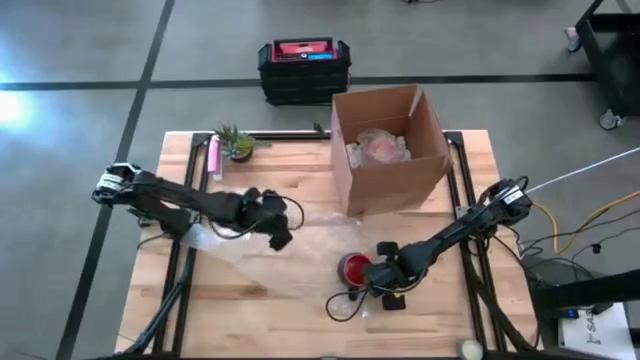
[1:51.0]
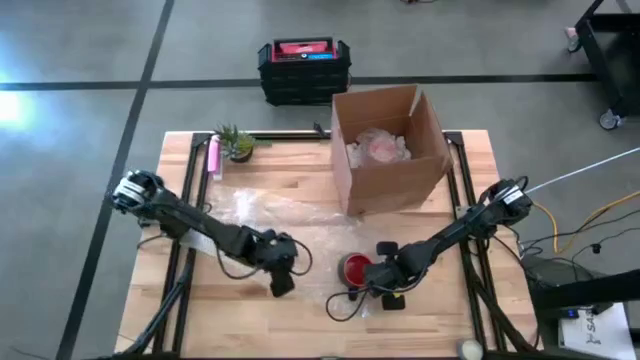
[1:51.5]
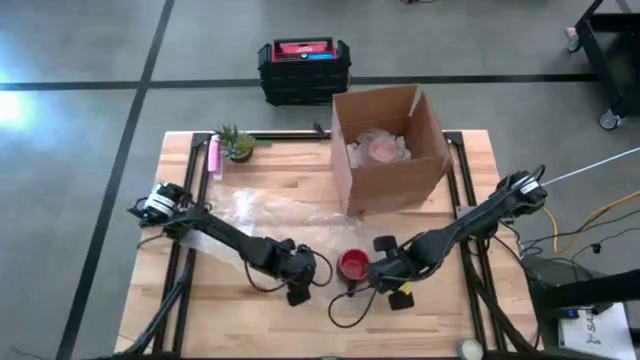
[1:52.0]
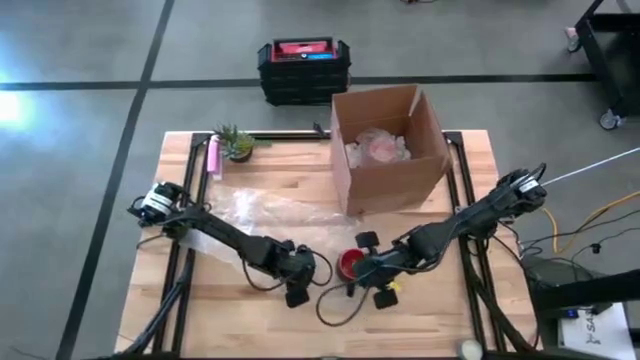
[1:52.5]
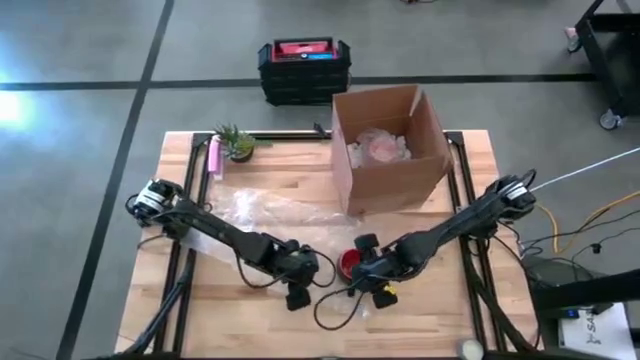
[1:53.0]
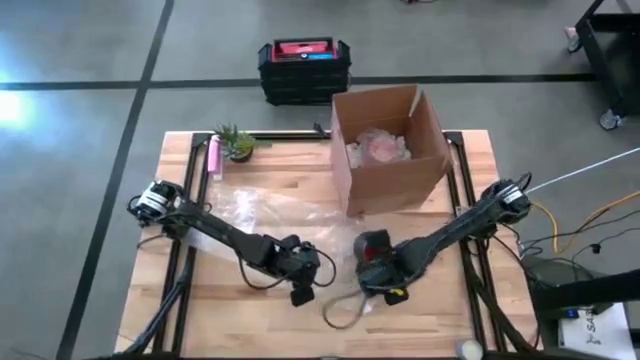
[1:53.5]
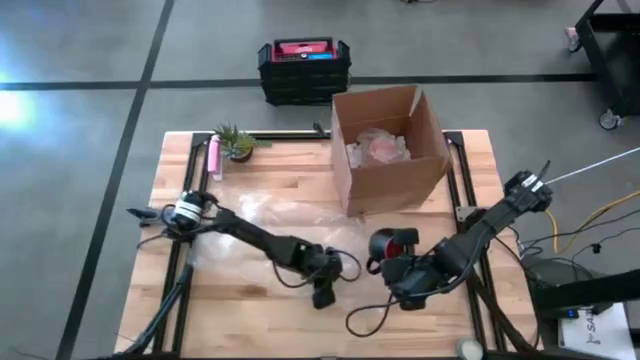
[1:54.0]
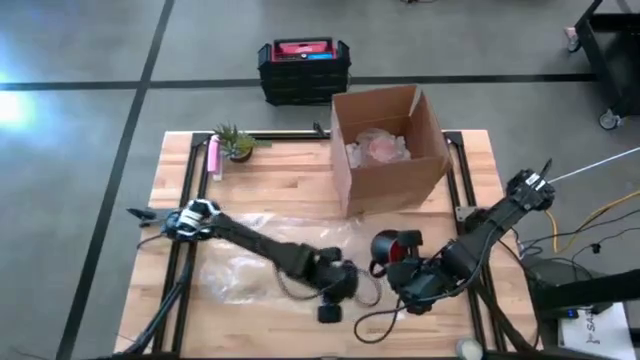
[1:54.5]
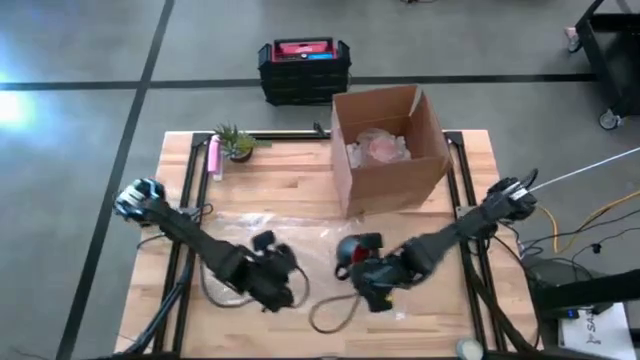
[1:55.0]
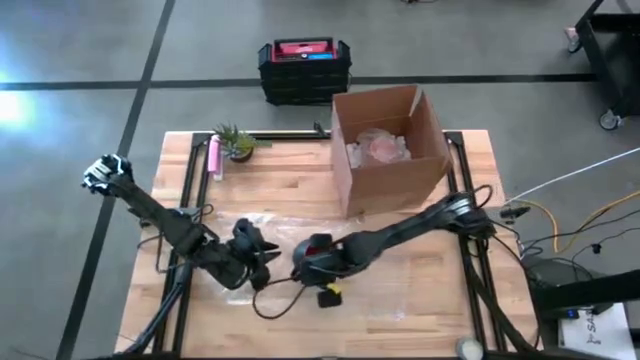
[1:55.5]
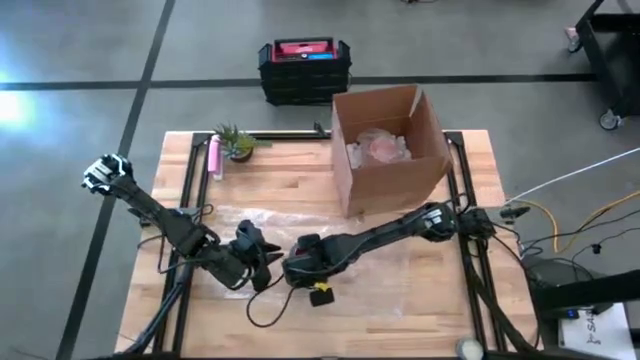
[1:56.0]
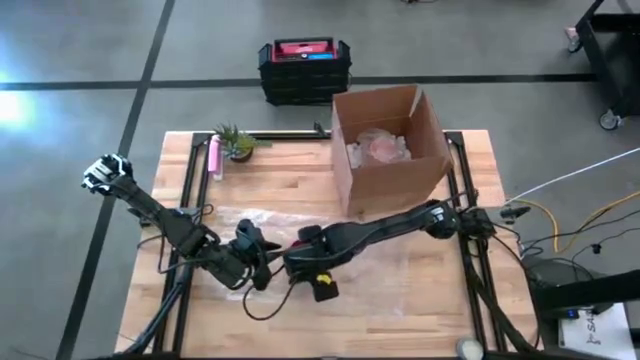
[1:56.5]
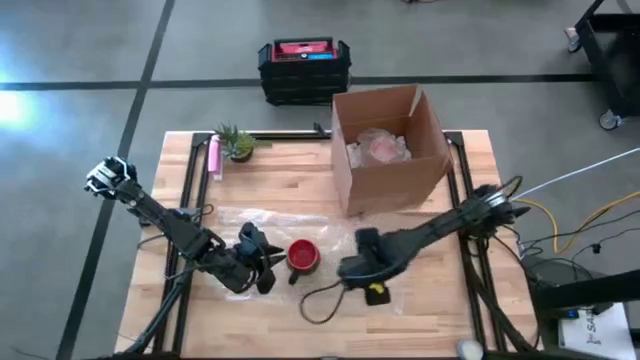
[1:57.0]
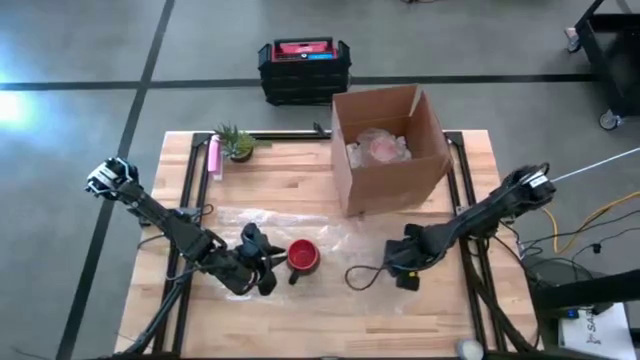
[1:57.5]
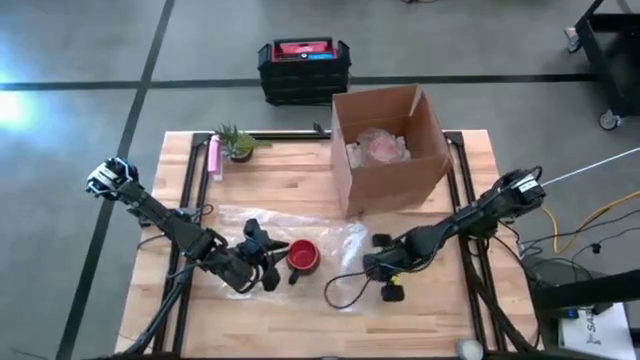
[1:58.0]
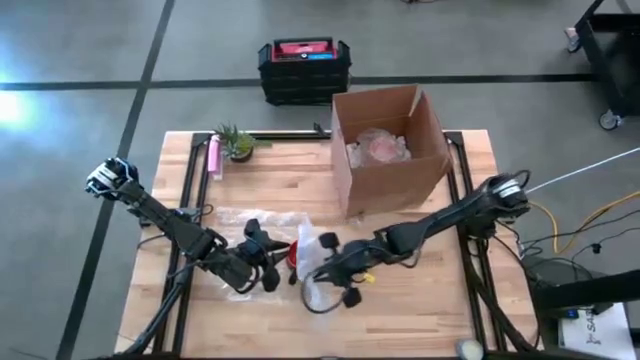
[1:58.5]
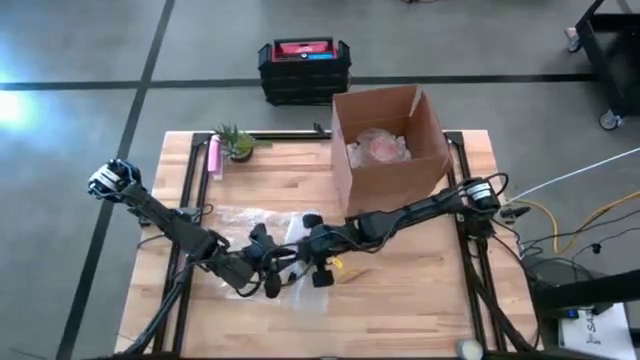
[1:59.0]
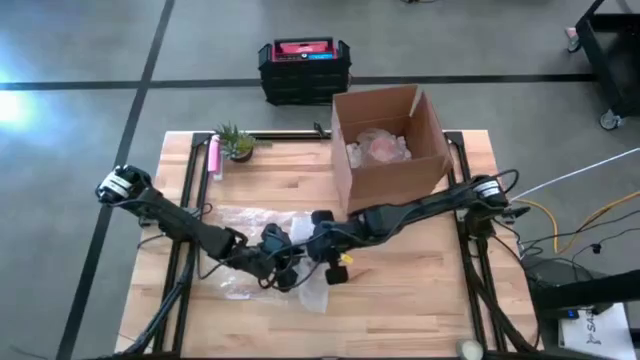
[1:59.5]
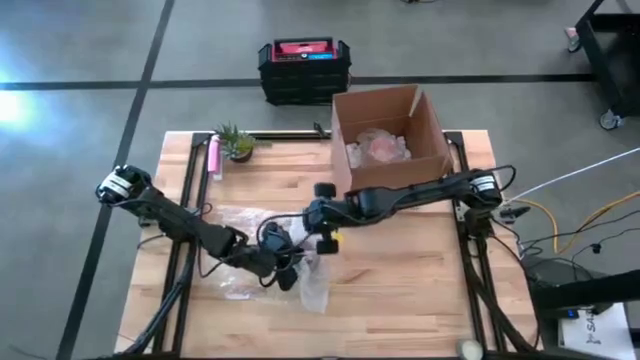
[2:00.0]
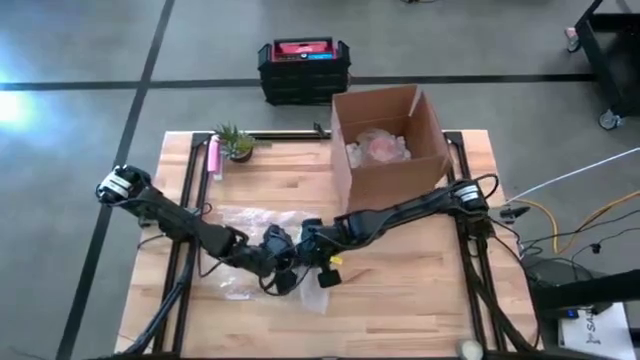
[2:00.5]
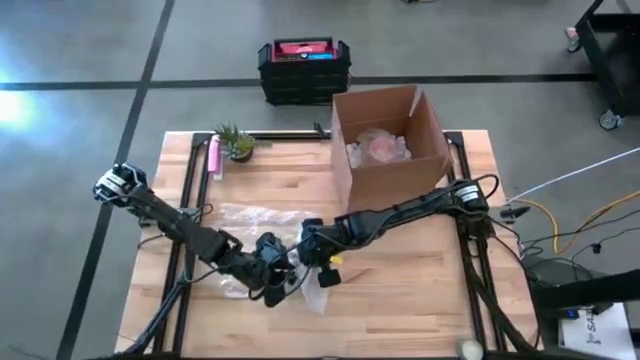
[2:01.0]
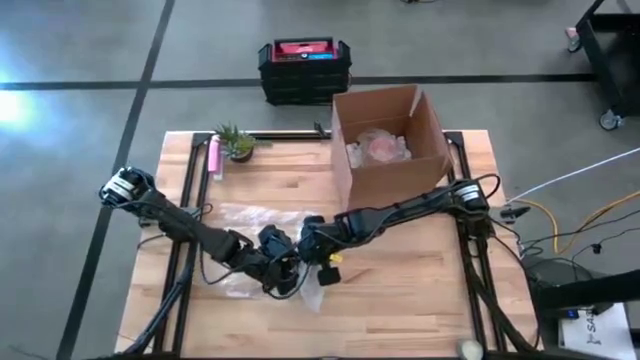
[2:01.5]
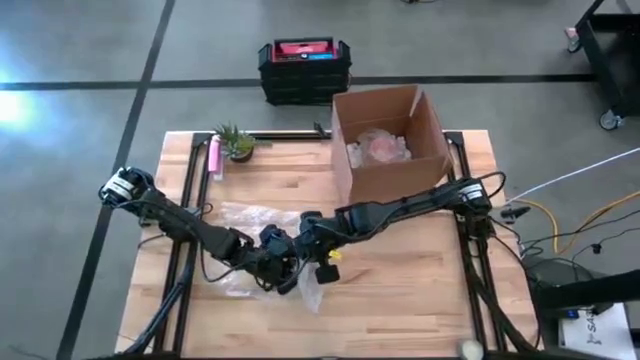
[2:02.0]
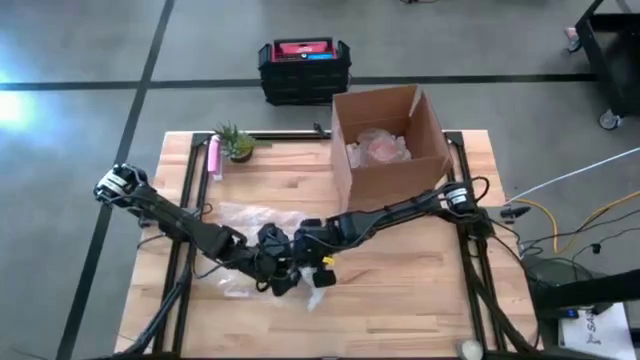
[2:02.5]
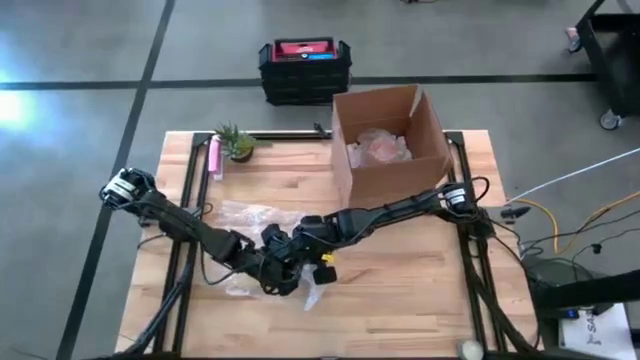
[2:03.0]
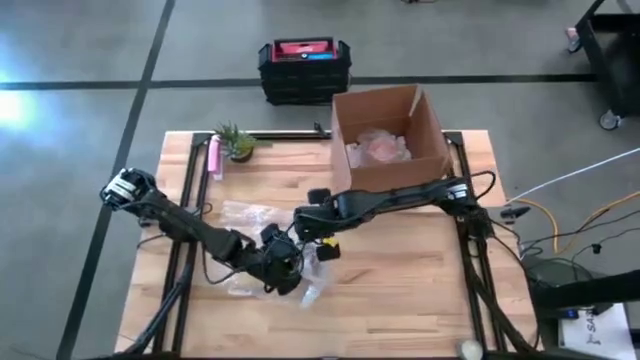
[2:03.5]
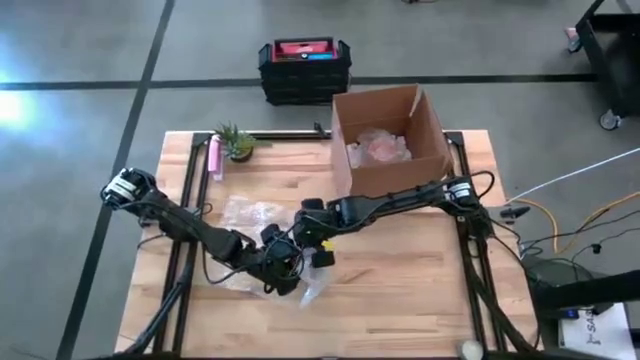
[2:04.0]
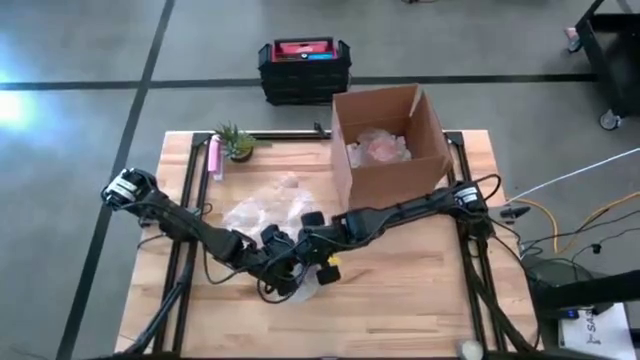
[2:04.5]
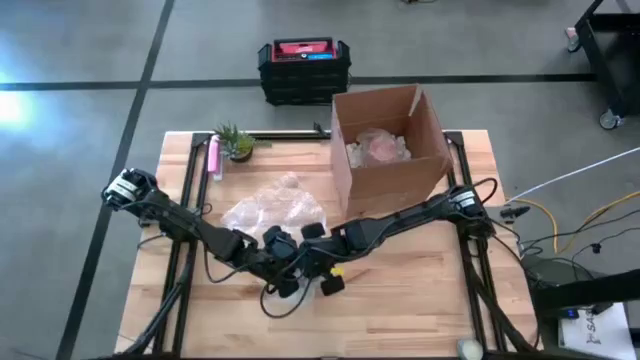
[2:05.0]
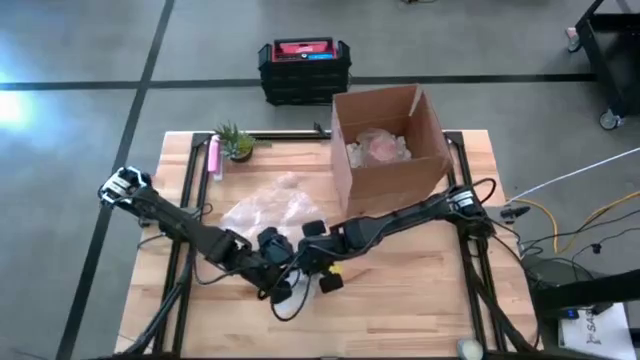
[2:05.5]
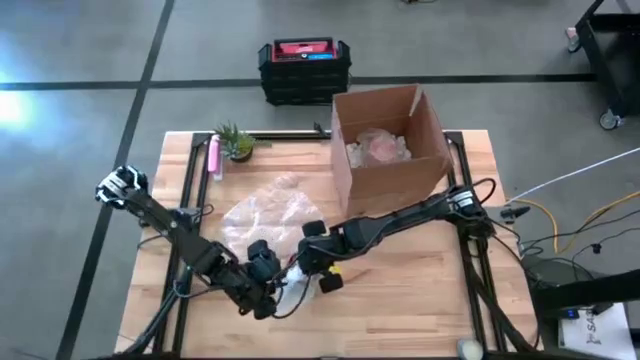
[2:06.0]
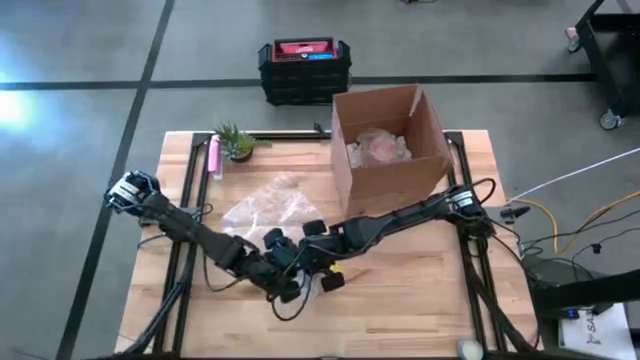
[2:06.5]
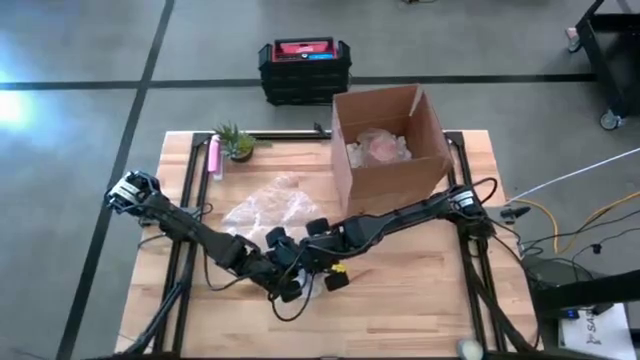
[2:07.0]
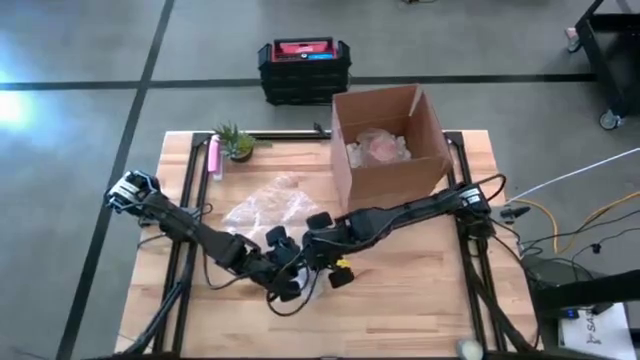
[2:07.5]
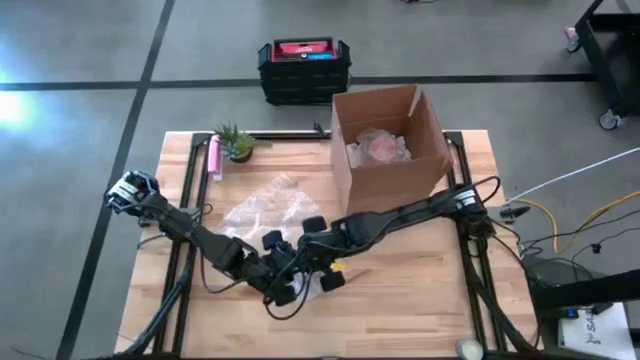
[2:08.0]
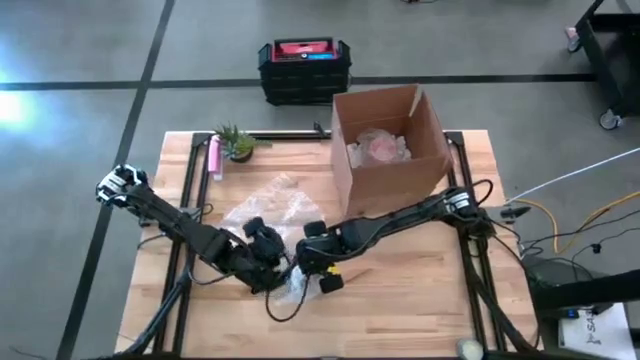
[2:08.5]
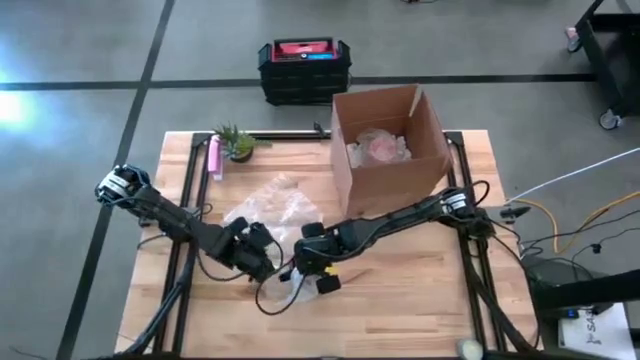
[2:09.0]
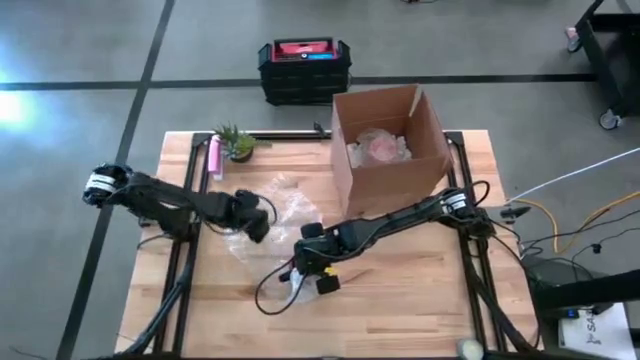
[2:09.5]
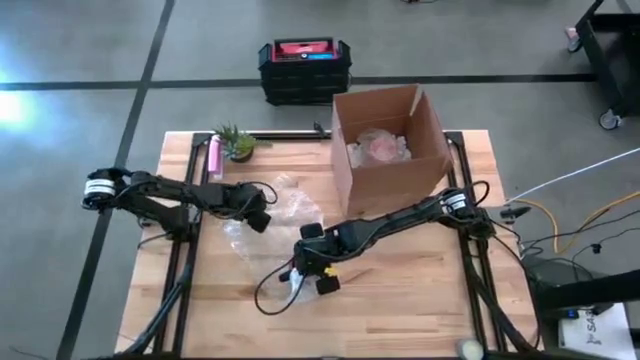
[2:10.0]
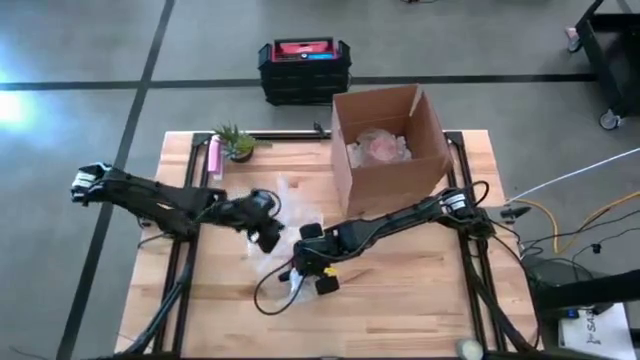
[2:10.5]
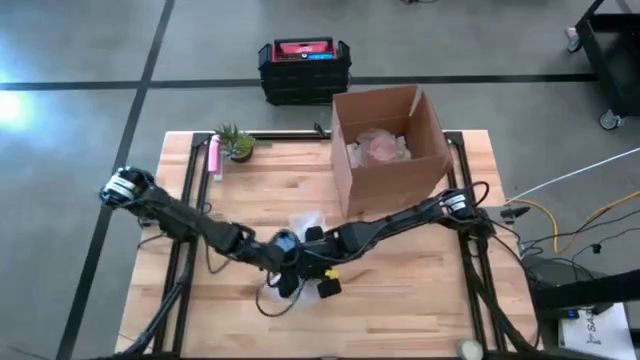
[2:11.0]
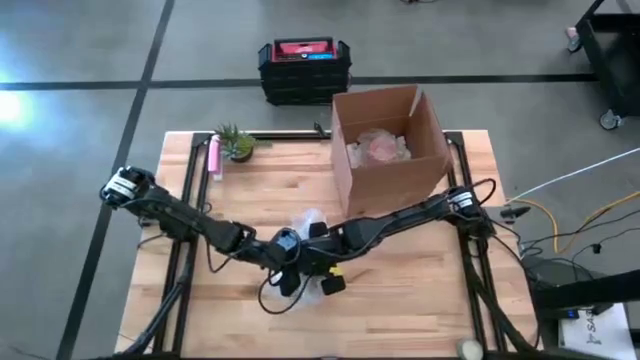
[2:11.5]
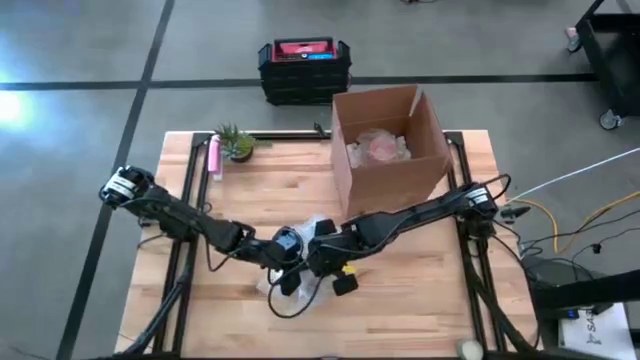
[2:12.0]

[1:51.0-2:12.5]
Task: wrap mug
Wrap the black mug with transparent bubble wrap
